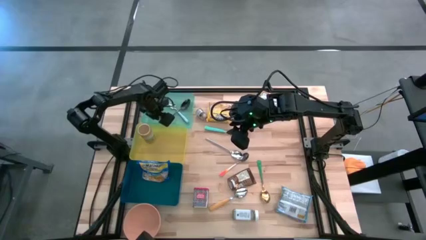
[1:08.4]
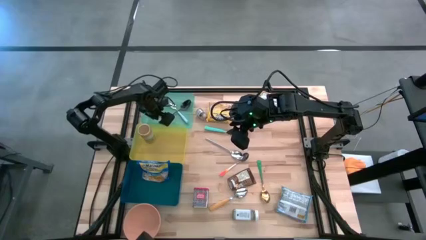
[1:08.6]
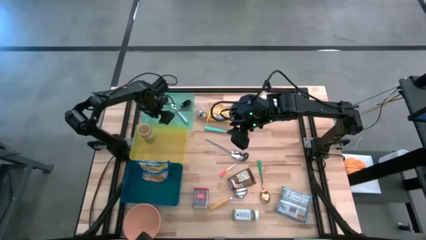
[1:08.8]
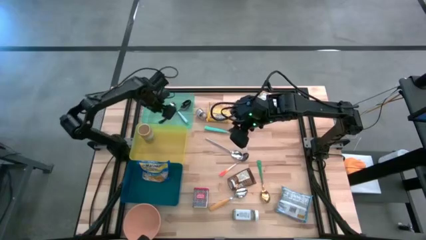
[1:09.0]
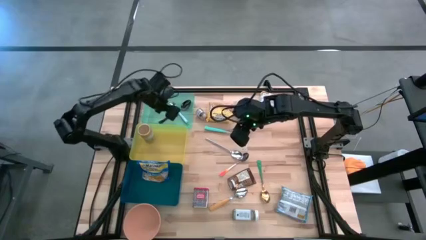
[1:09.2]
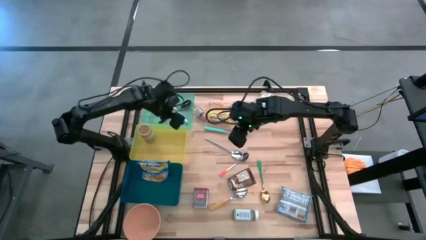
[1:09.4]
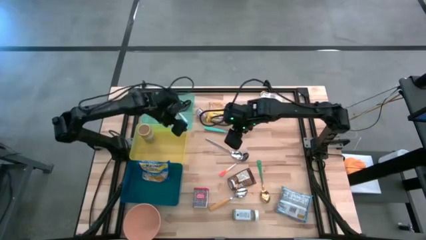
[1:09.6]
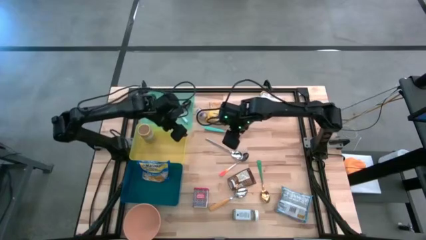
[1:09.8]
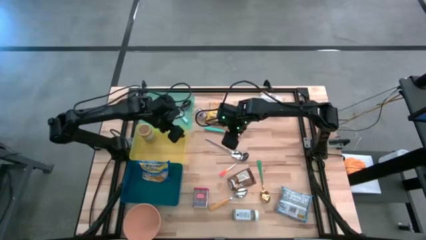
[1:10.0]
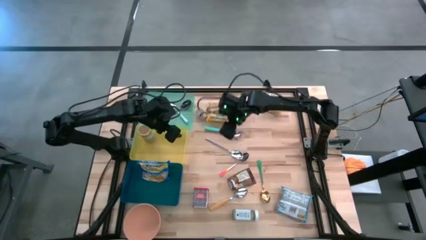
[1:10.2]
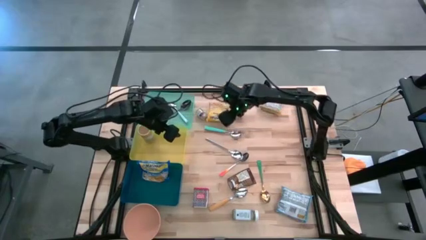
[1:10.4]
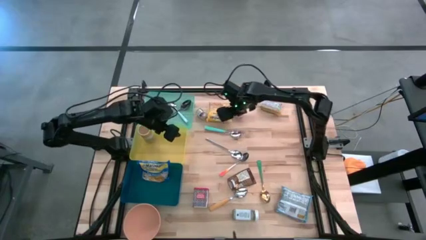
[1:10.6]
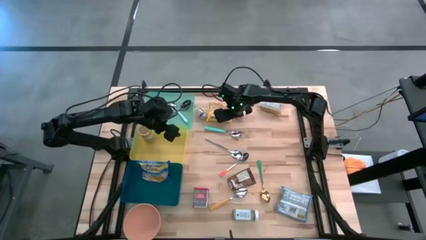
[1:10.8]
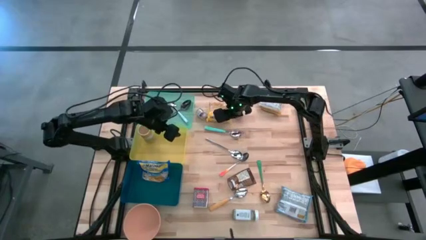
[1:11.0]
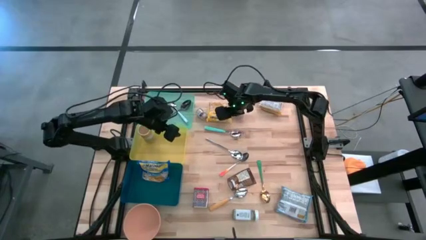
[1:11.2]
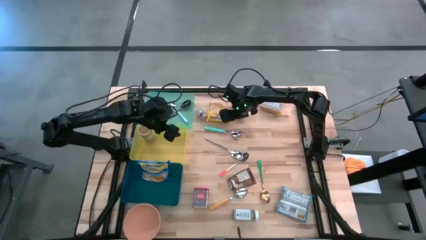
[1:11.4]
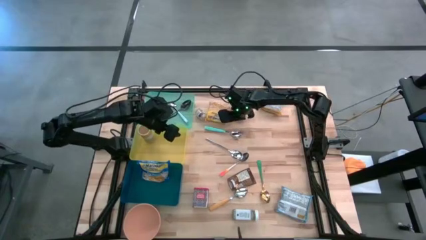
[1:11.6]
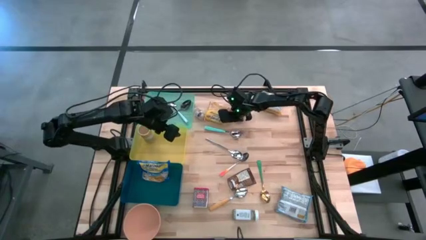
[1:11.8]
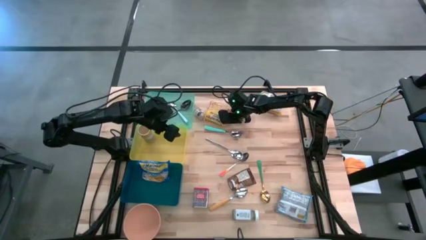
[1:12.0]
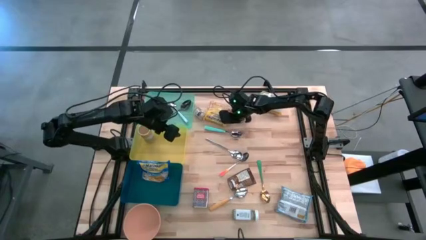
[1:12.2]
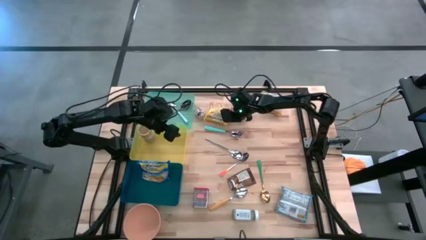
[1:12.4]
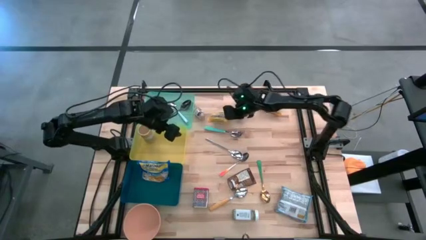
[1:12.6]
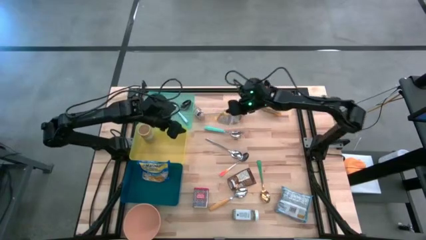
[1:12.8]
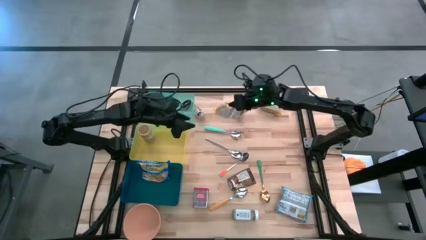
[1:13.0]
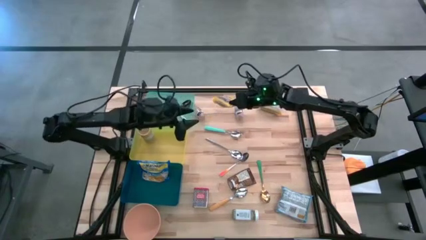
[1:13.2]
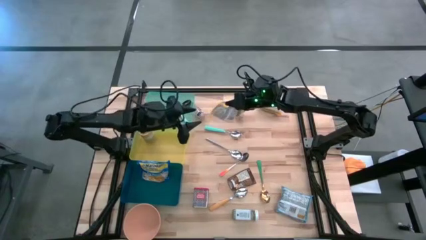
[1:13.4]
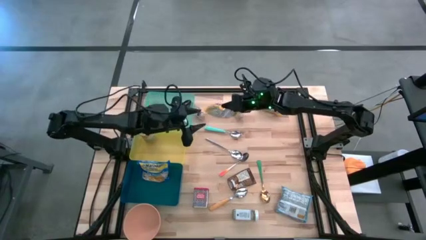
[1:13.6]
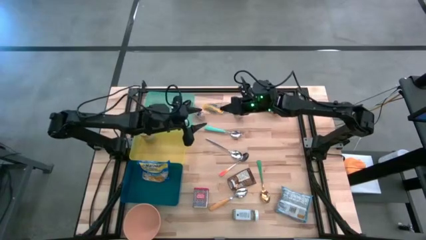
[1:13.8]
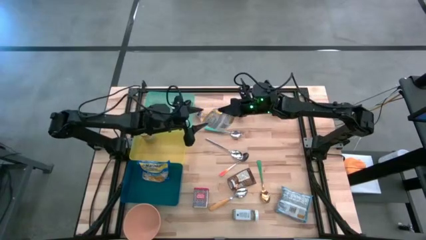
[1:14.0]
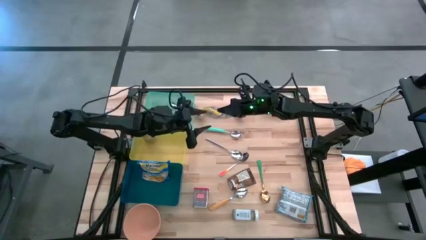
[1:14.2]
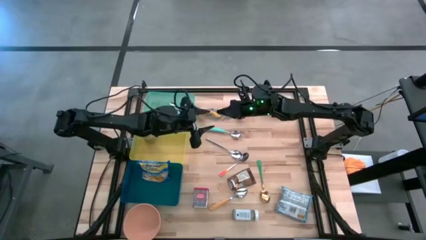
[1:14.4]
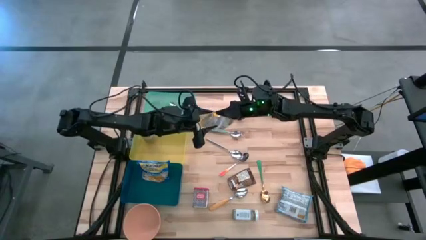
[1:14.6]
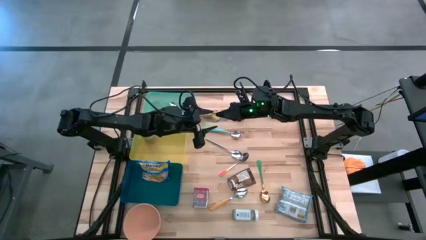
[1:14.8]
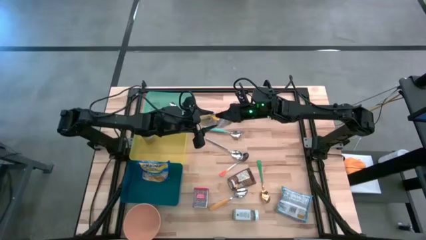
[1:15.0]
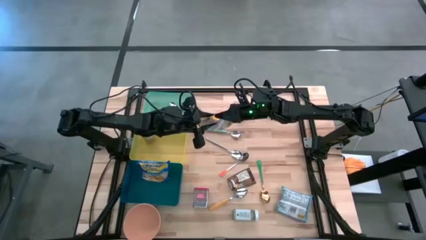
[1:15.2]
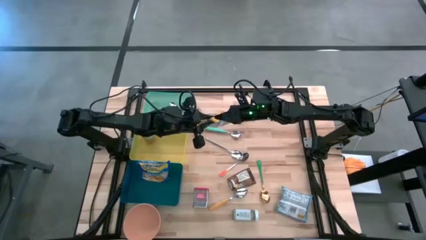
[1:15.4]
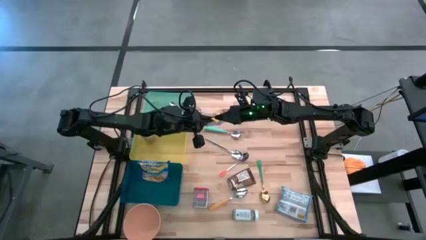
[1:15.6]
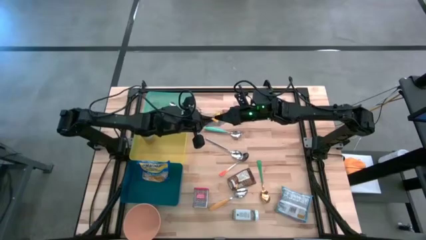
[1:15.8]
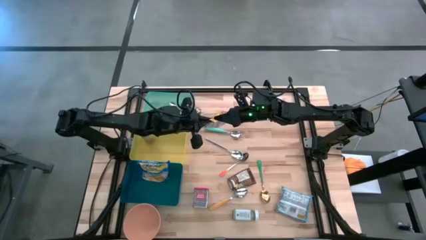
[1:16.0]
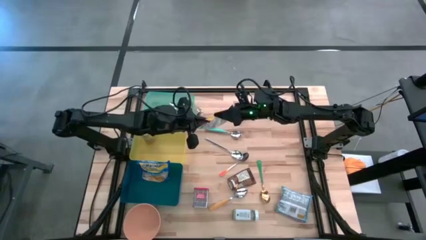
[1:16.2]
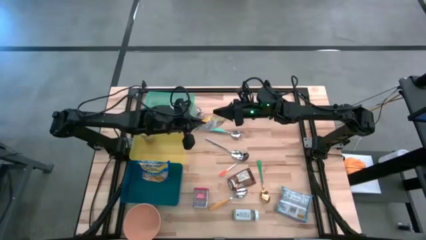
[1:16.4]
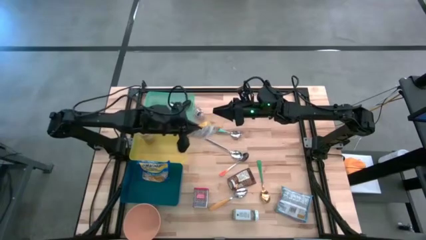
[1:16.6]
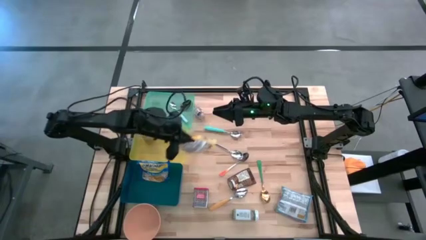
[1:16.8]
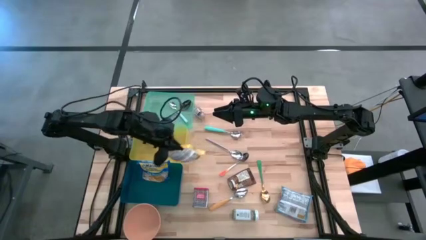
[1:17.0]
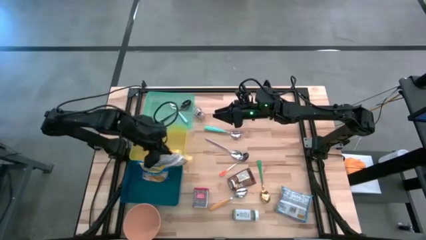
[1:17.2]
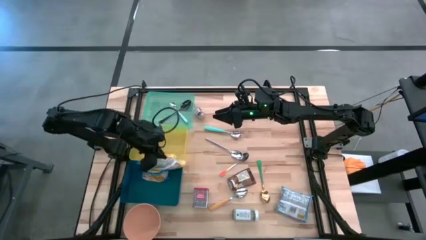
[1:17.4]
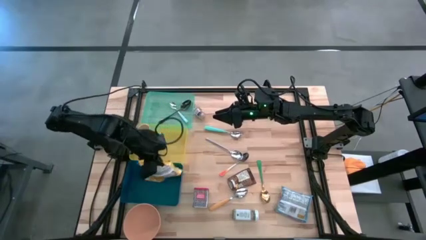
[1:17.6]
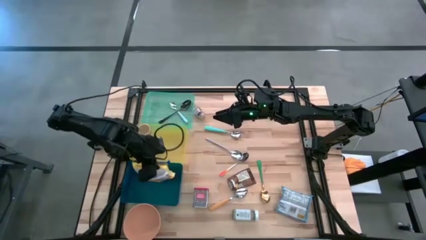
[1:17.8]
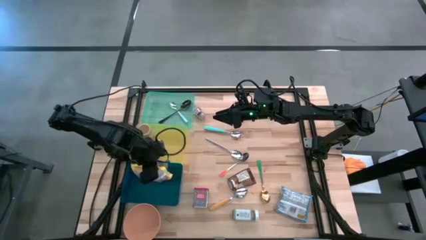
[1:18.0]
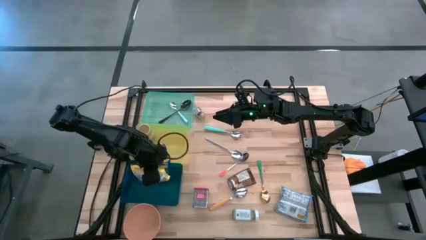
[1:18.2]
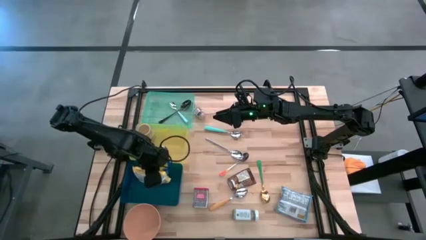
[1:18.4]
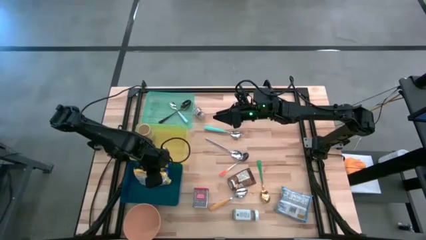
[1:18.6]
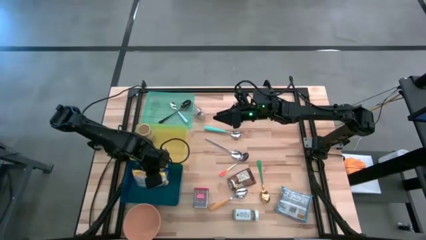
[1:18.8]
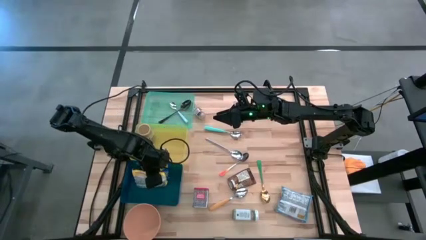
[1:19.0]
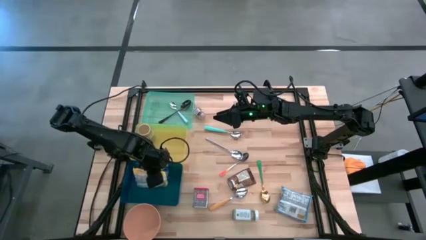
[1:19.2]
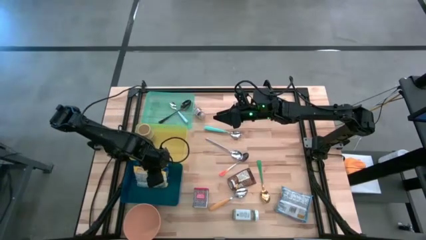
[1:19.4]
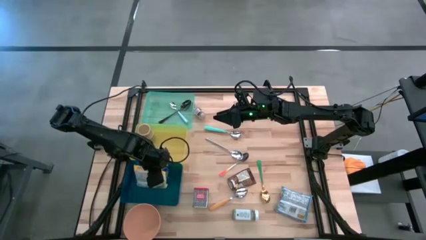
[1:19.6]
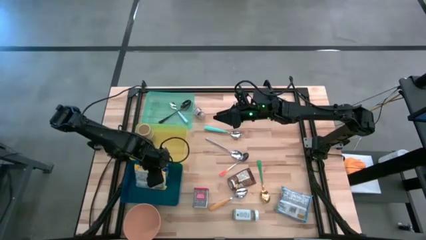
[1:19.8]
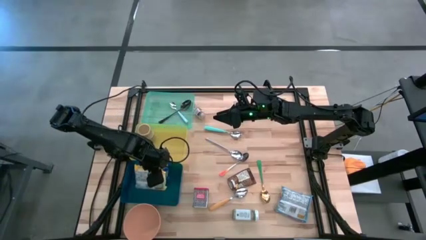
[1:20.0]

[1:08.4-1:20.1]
Put the left yellow noodle pack into the blue bin
